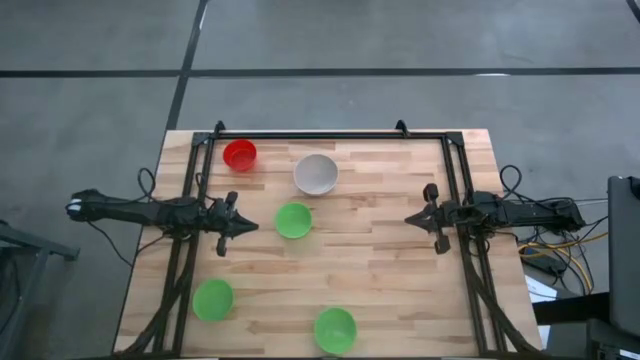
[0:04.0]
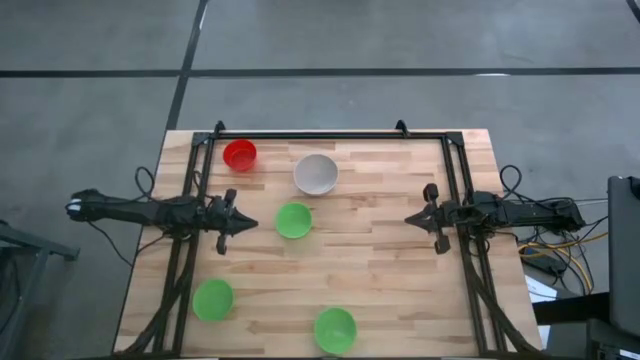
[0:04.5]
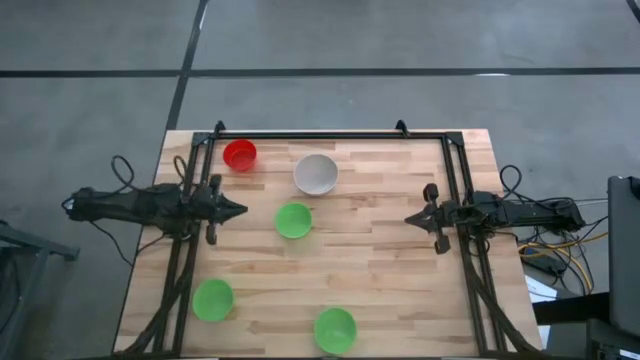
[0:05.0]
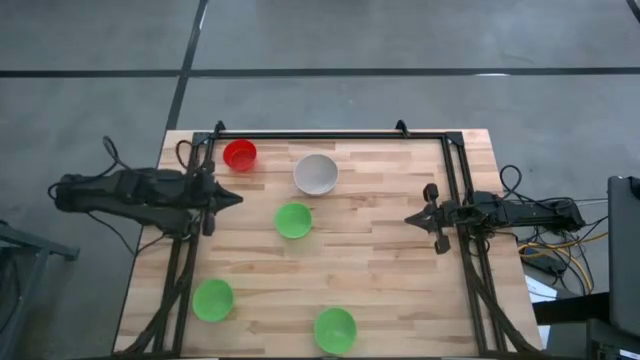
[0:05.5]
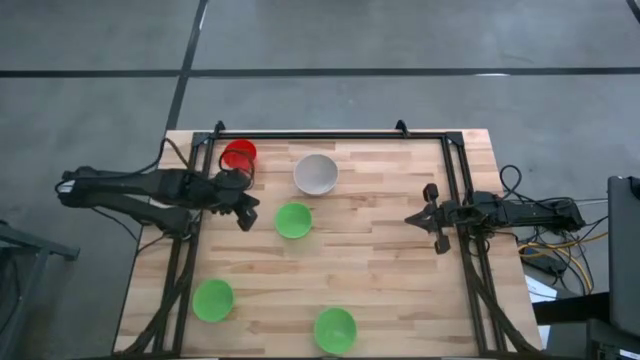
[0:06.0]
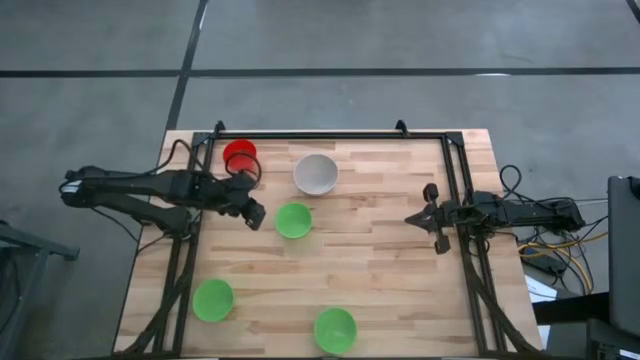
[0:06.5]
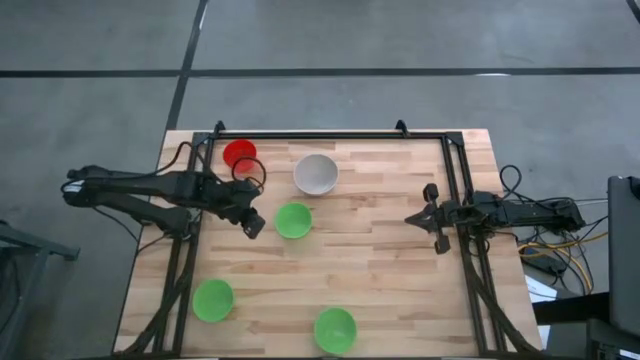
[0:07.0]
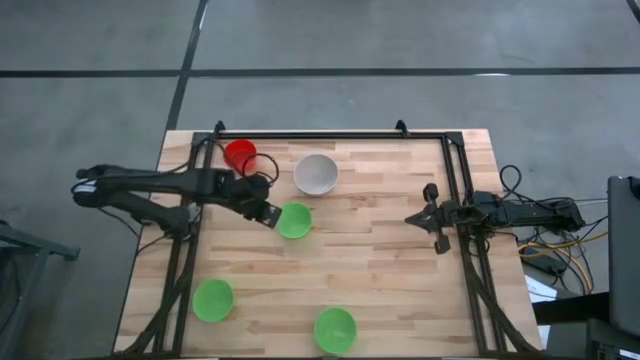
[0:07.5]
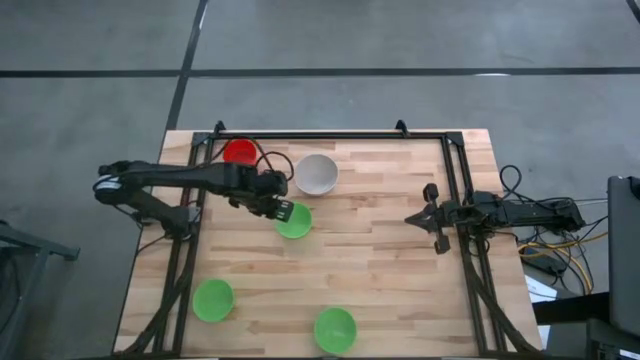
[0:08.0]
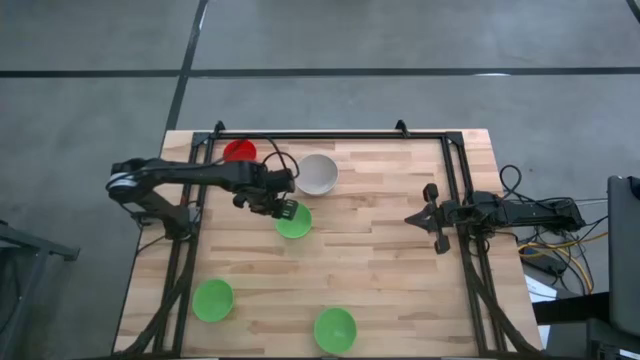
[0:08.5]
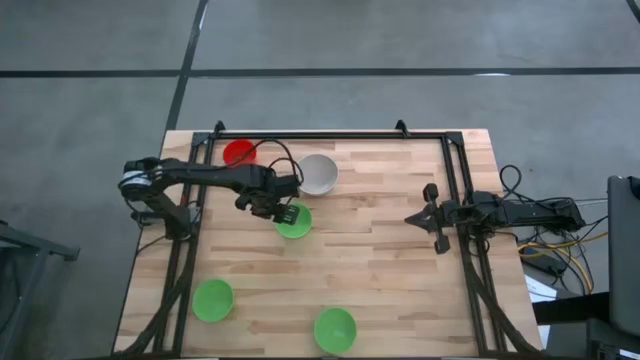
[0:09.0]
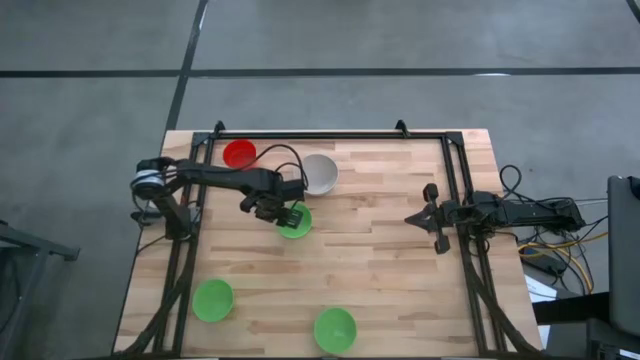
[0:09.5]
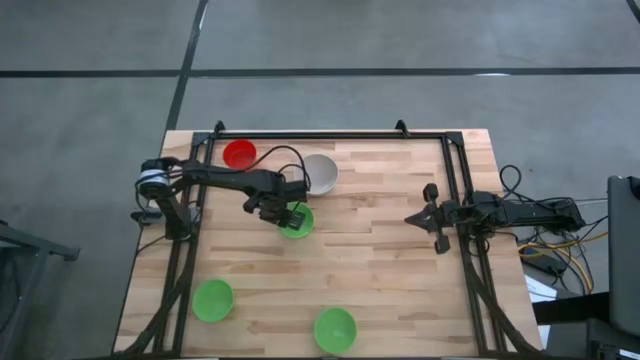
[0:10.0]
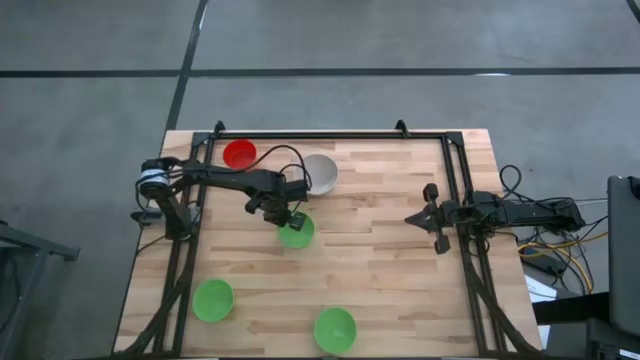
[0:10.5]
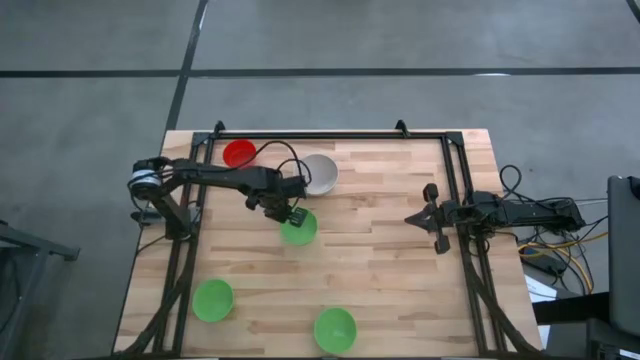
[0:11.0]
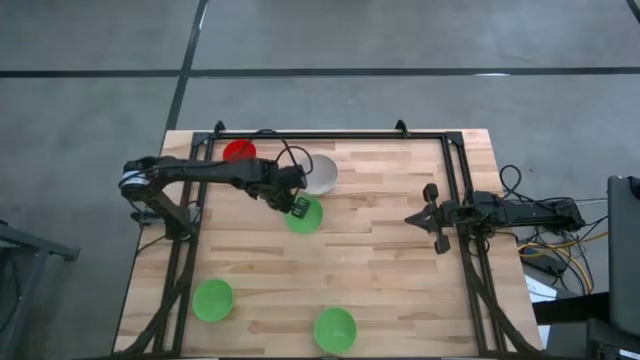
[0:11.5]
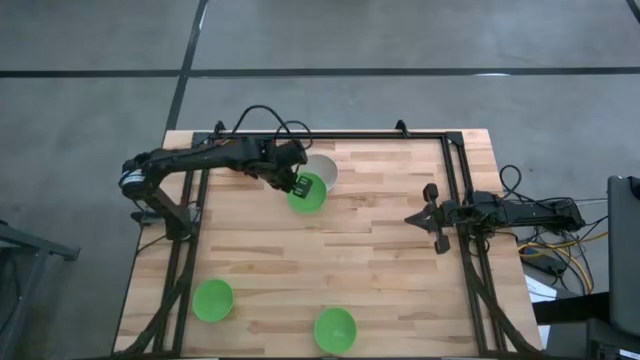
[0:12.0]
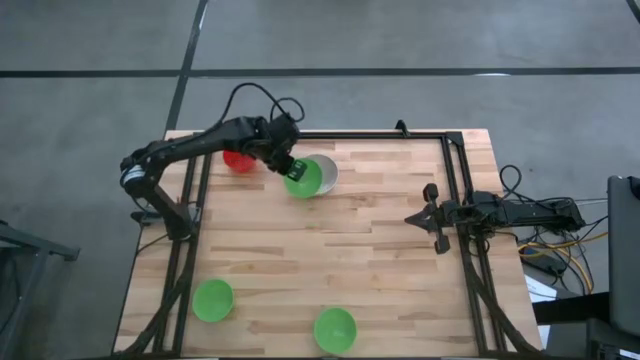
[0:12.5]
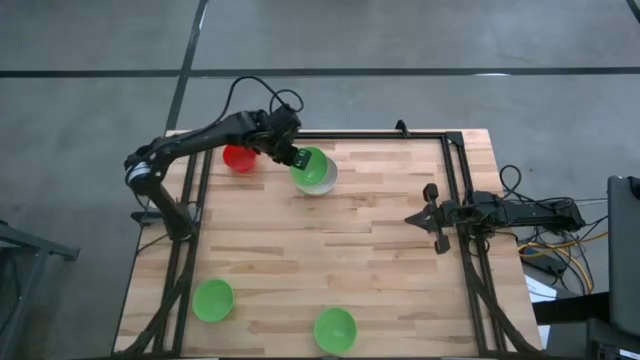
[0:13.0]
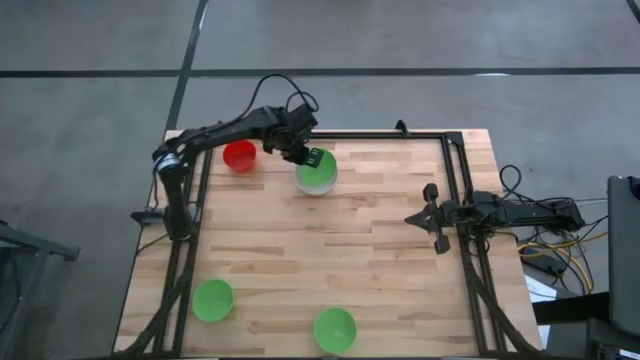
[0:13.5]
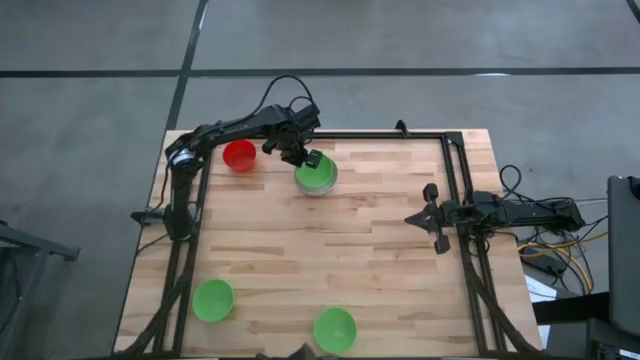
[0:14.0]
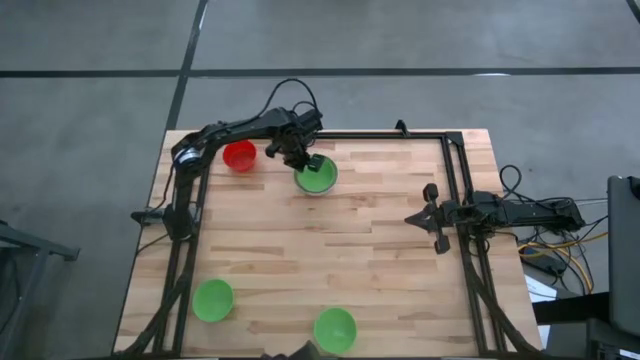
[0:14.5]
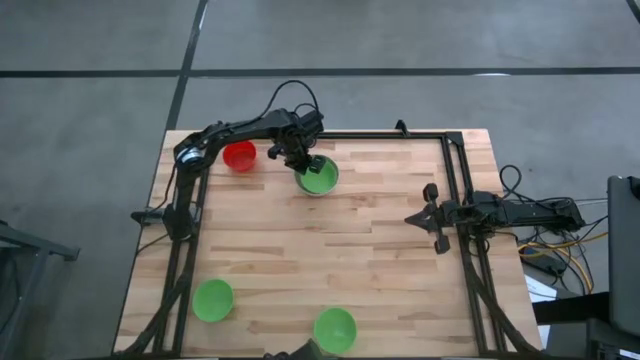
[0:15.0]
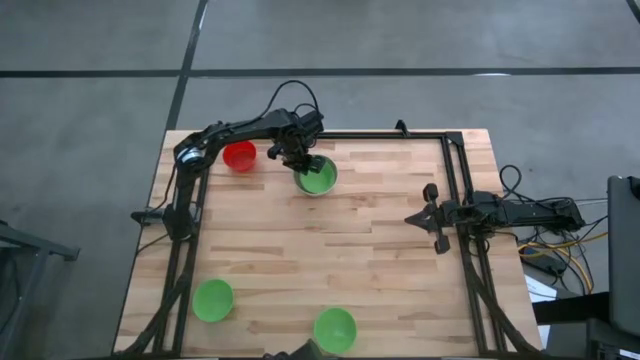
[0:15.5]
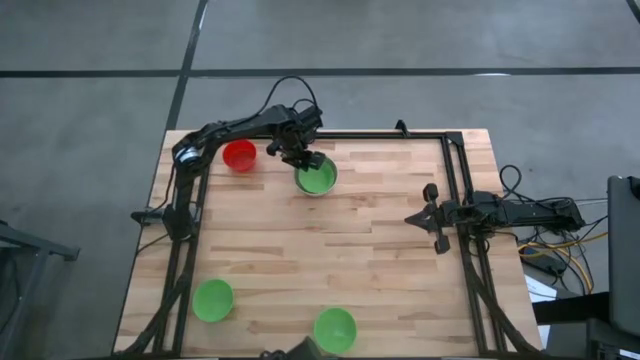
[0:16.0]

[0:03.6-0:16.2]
Stack the top green bowl on the gray bowl

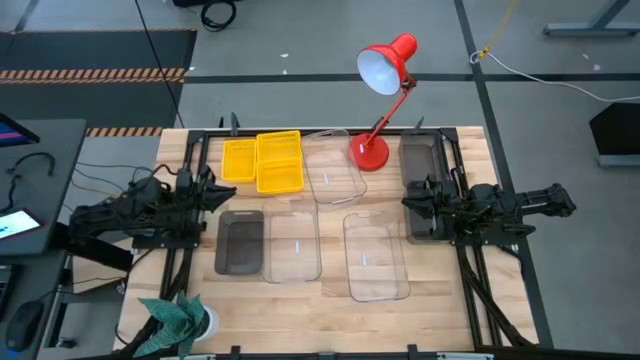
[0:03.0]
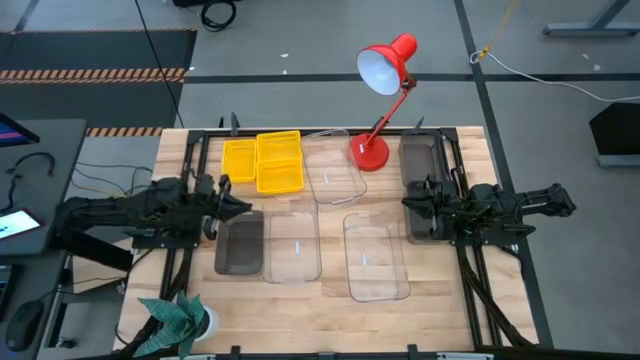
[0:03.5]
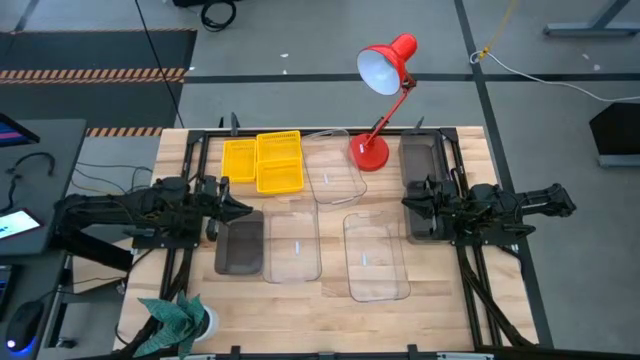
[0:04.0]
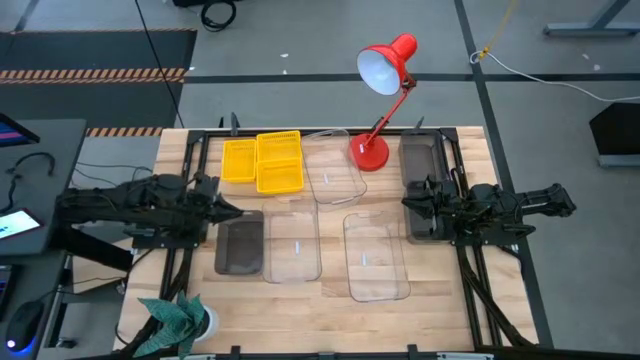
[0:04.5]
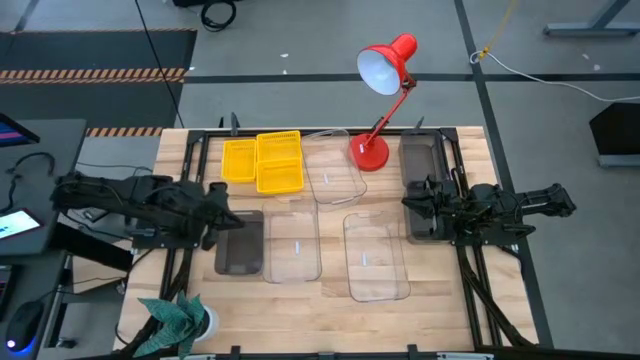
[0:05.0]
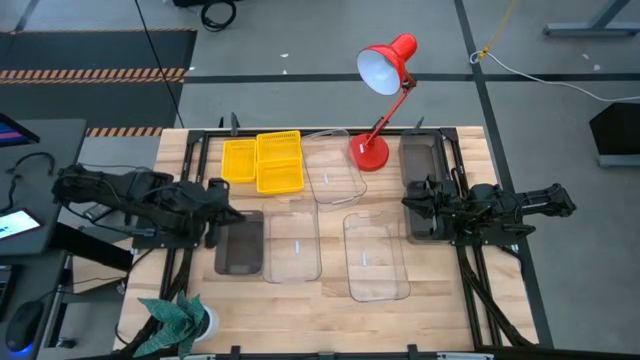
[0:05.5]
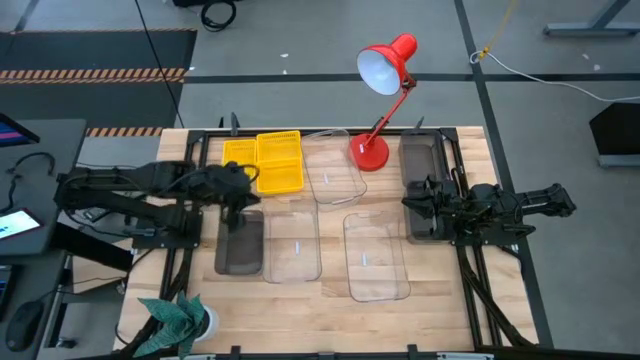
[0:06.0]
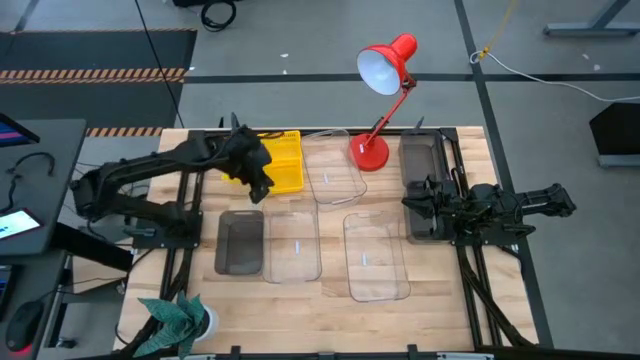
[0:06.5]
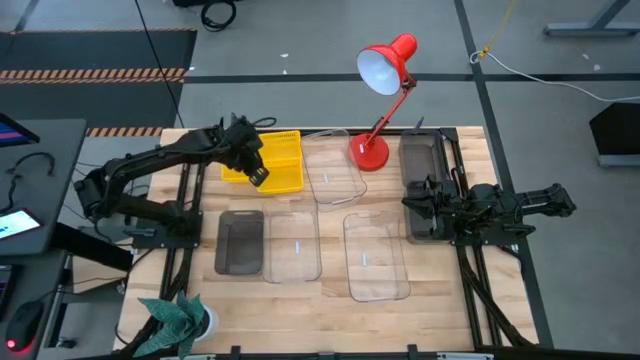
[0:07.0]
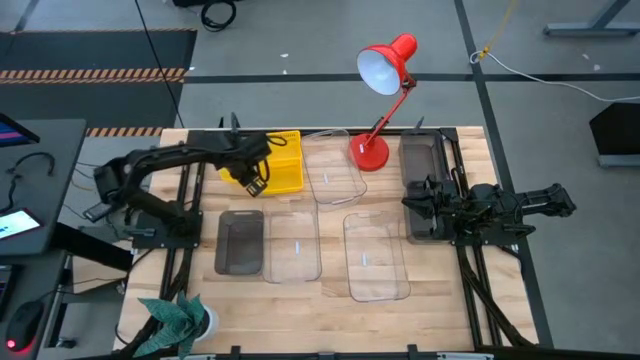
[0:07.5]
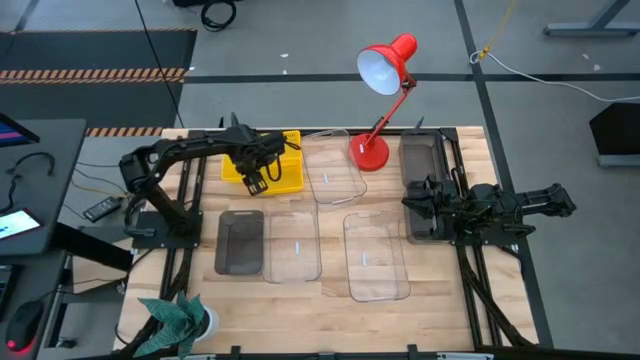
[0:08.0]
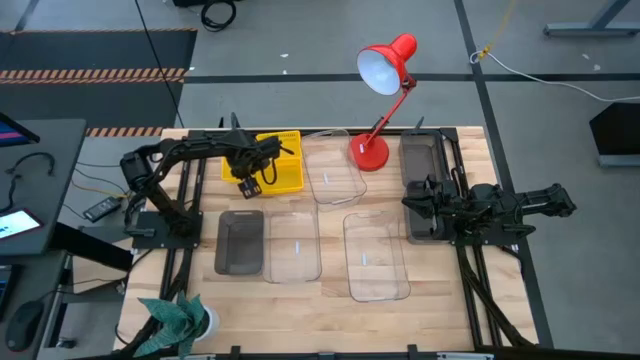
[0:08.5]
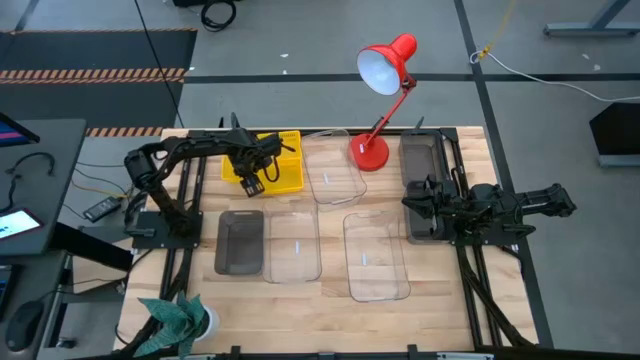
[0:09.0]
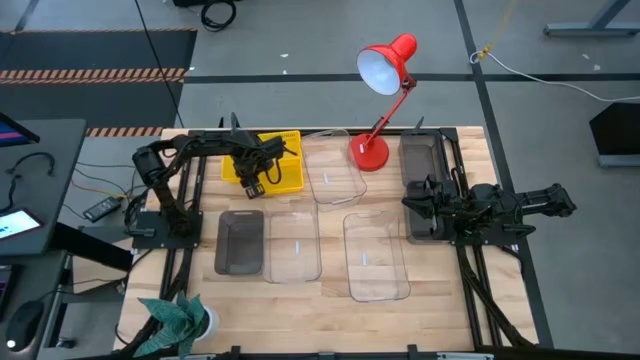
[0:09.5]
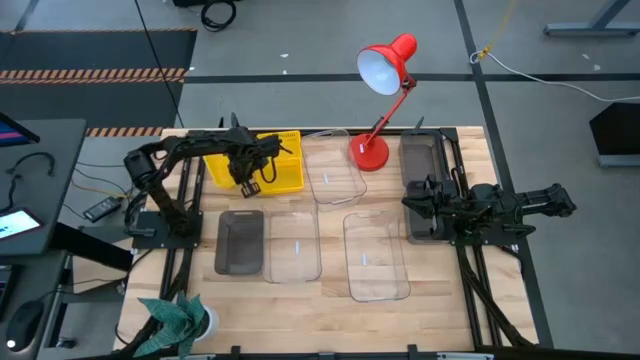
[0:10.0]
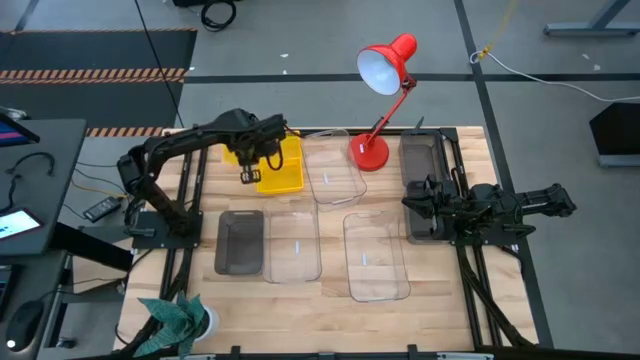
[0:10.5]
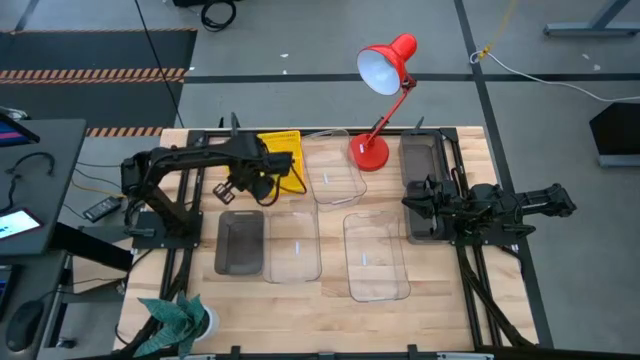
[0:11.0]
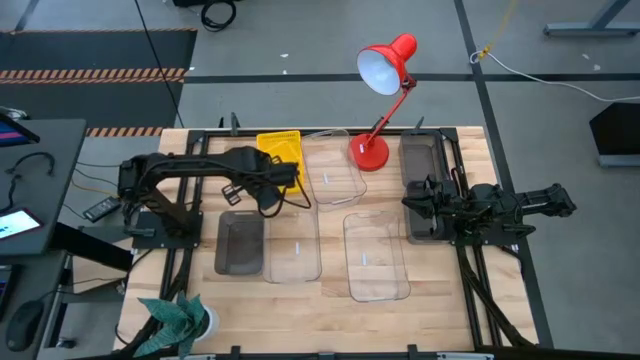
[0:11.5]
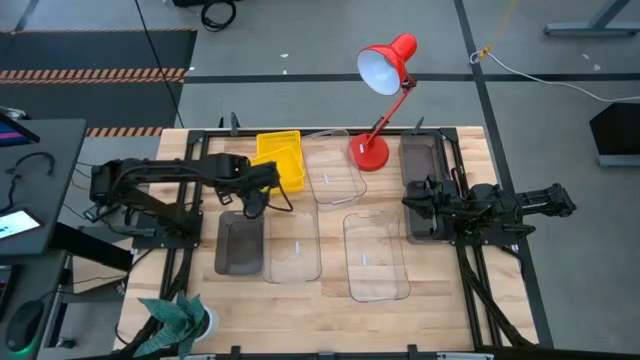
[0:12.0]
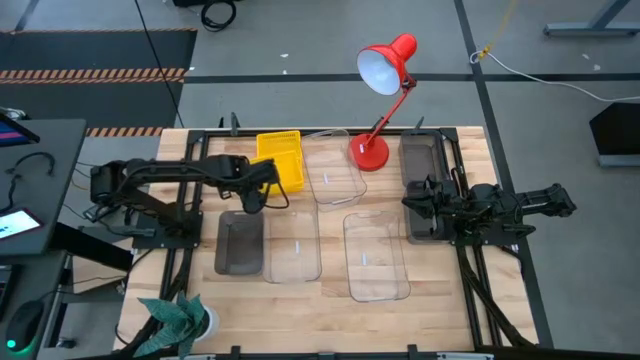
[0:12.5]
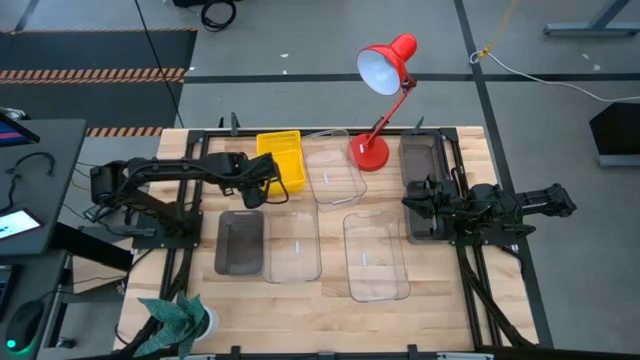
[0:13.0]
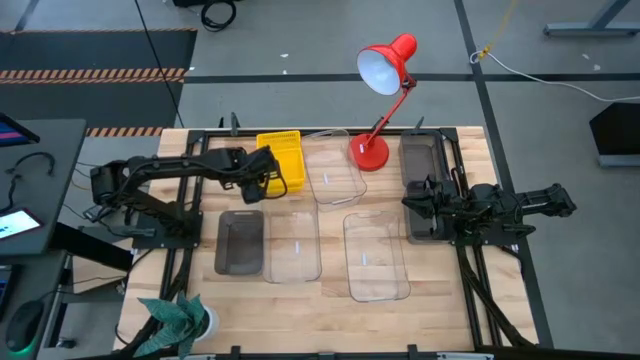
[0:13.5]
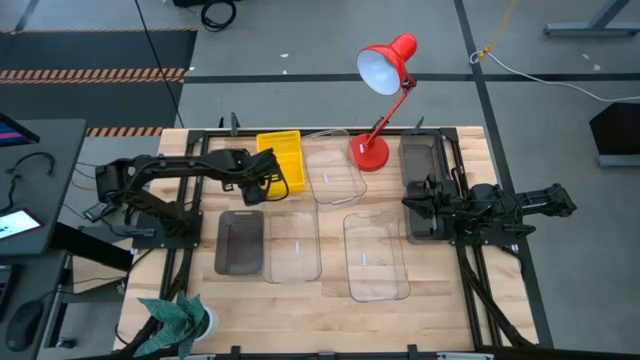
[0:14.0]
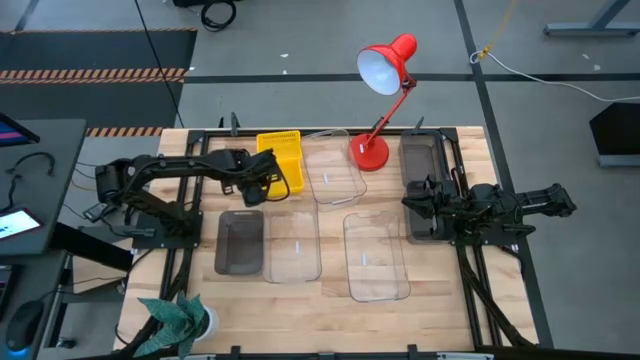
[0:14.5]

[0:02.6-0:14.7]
Stack the left yellow bin on the bottom right yellow bin
